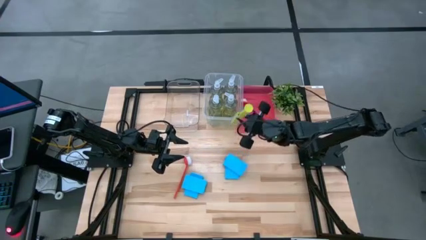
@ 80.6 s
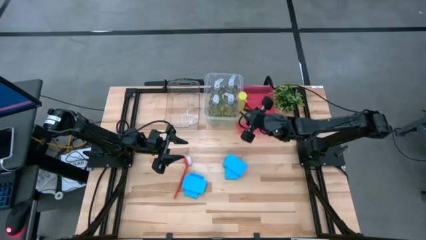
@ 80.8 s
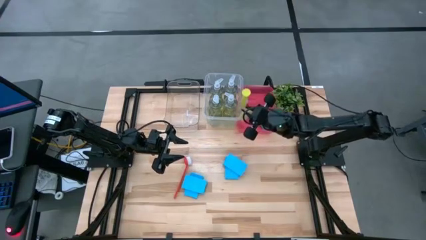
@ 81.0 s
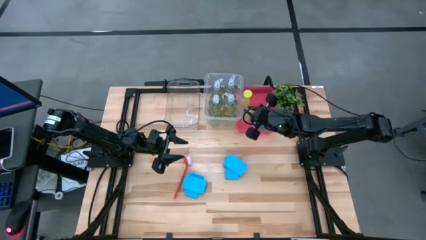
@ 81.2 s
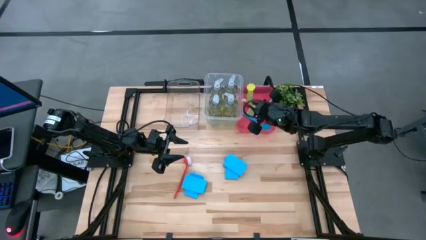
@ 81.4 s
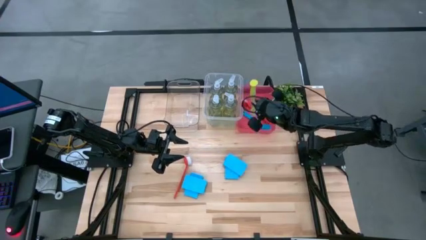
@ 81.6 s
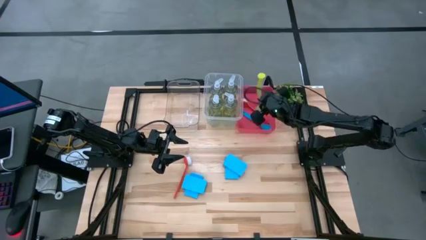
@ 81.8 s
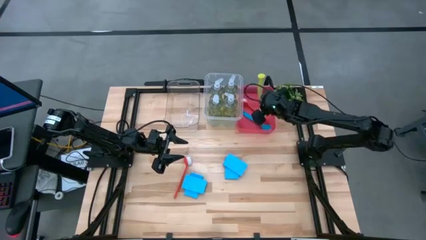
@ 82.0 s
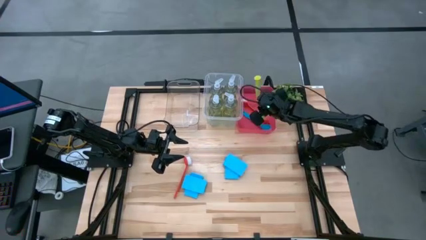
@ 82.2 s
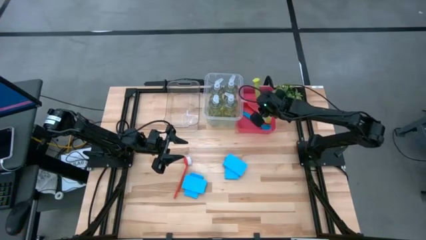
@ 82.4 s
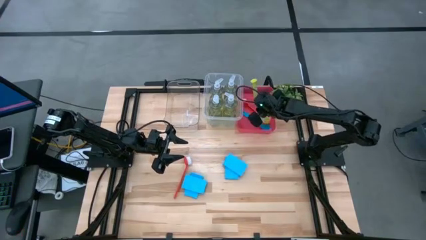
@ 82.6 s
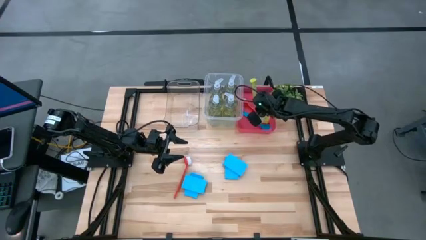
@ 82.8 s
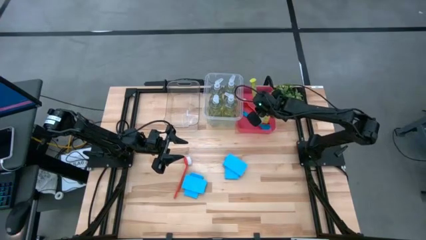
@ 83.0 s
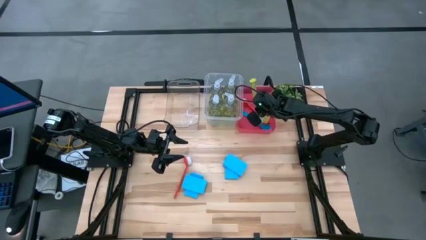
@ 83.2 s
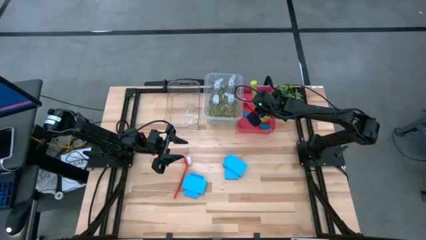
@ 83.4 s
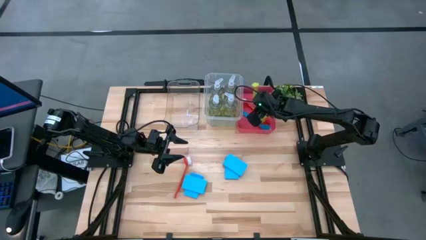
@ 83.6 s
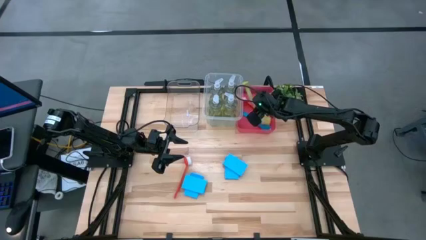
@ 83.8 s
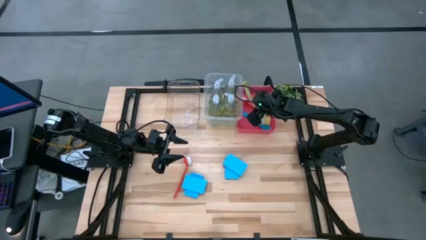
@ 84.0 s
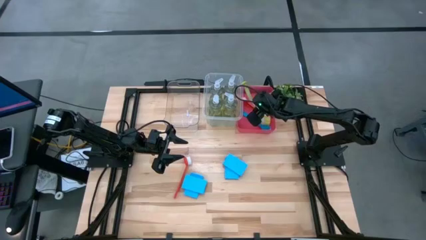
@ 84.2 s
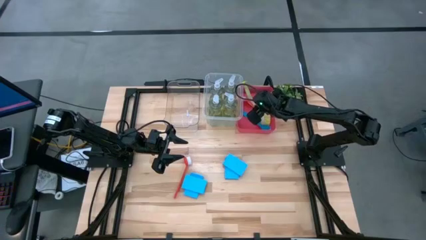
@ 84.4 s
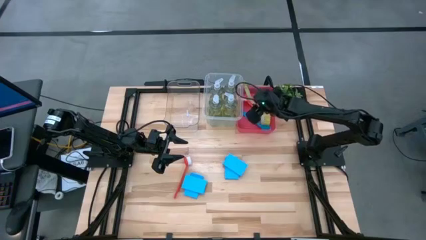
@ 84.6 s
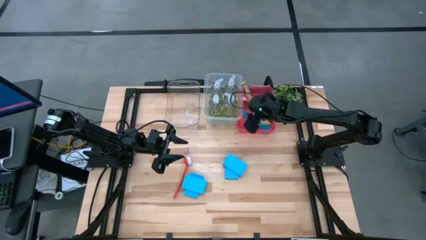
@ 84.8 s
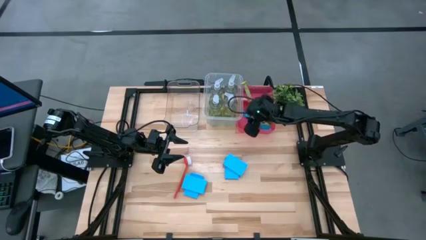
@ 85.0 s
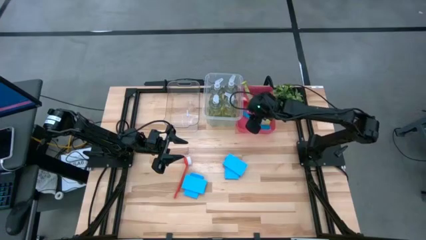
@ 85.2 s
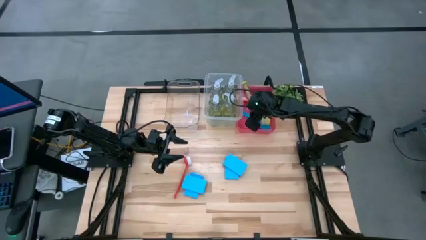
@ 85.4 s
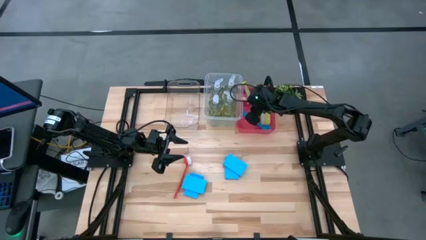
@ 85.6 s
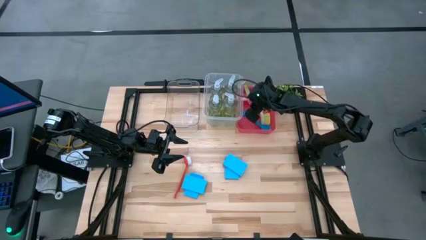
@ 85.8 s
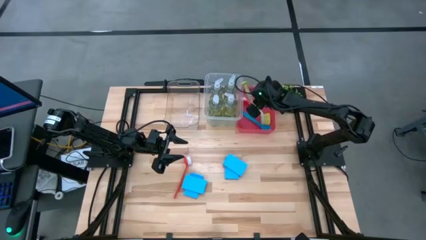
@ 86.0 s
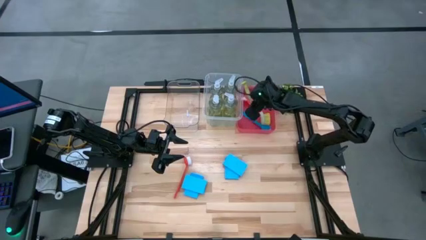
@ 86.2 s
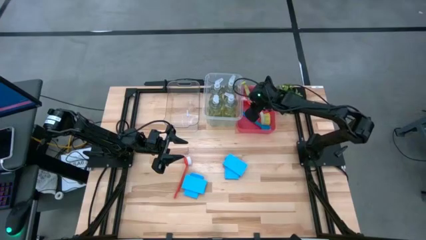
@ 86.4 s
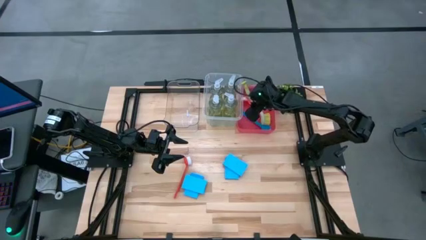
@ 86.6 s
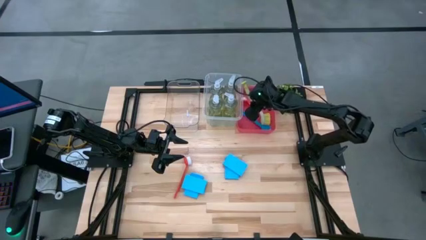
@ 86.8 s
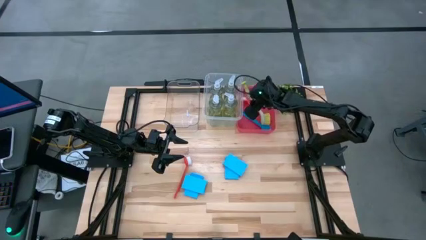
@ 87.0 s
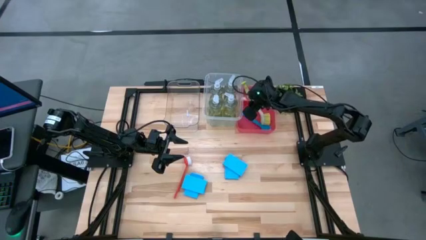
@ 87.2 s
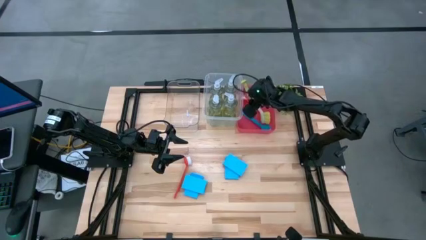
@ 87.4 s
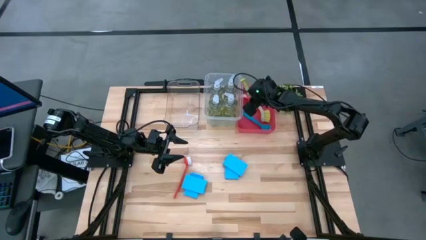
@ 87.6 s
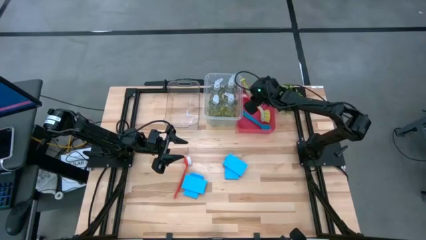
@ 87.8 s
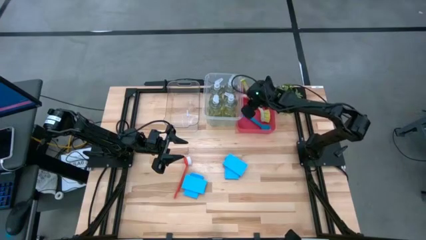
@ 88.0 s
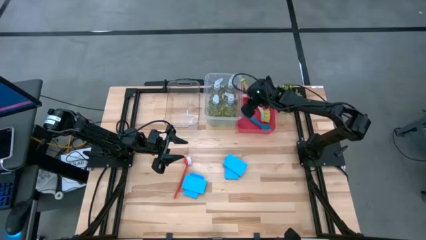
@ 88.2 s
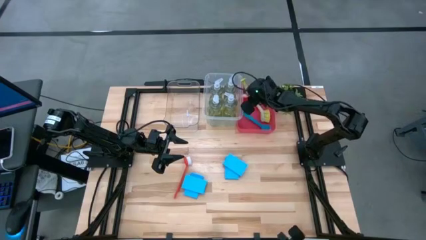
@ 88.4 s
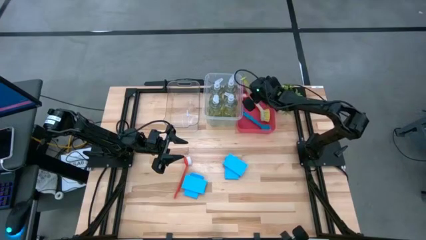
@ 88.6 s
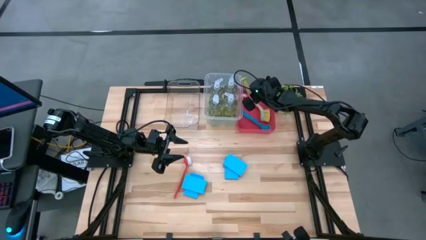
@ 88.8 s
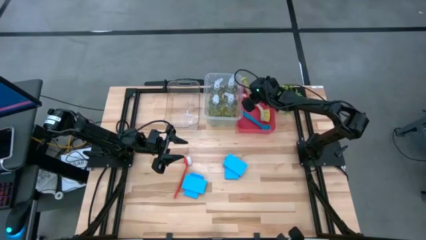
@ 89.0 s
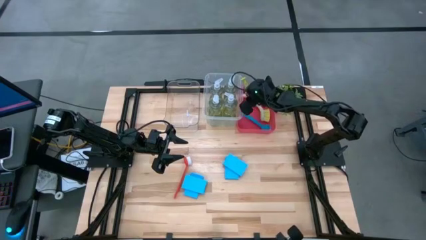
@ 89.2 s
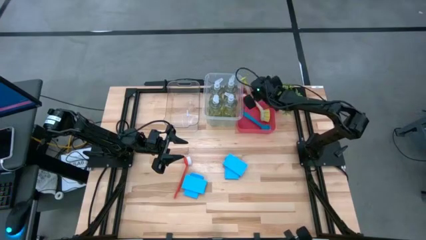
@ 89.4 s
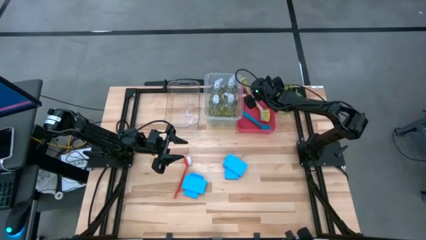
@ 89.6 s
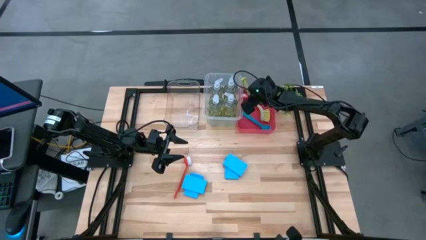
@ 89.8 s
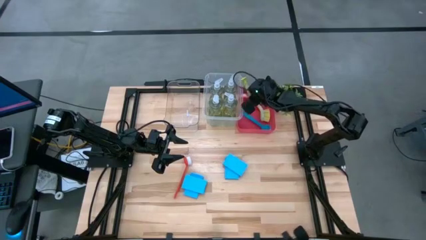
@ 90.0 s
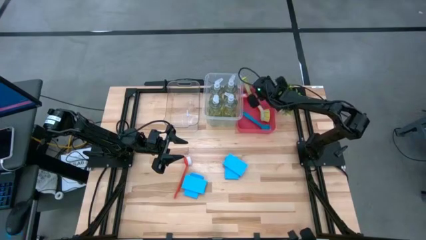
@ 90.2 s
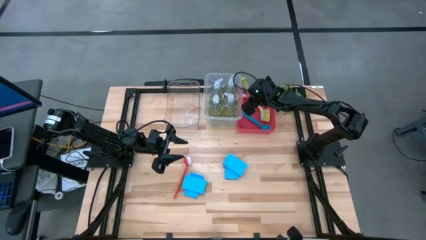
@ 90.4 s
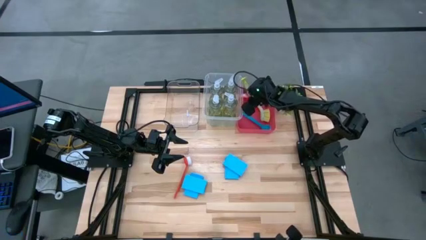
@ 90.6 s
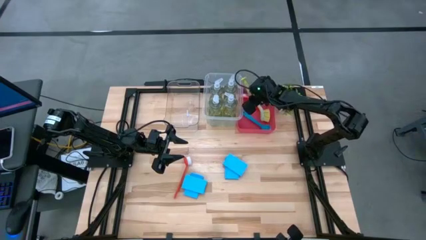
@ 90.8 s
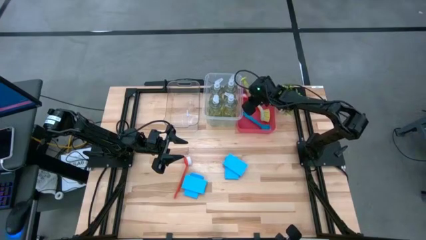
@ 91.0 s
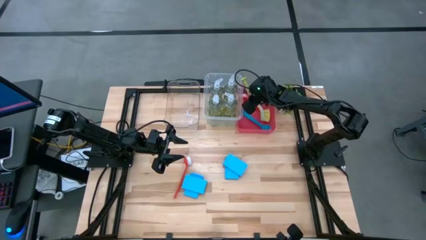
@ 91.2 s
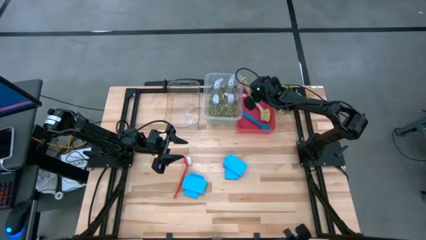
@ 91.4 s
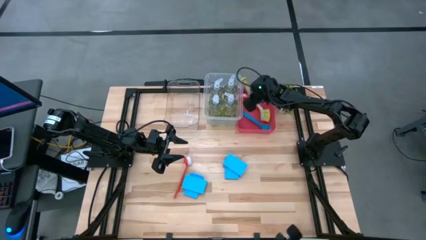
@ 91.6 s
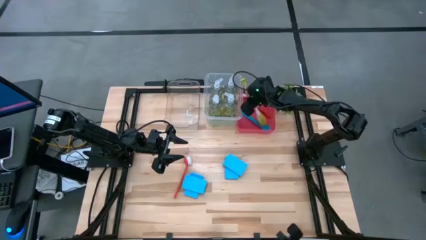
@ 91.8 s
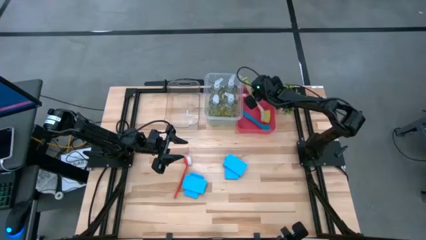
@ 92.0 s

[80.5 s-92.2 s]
Task: Pick & Place Kitchen Sink Supplies
Put the green dish brush into the pink bin

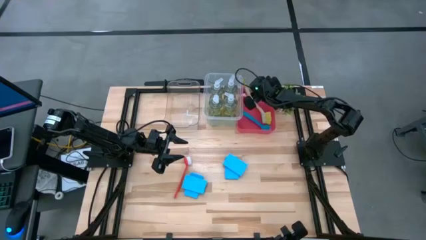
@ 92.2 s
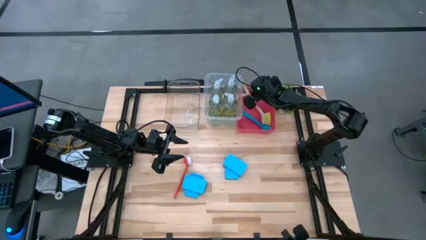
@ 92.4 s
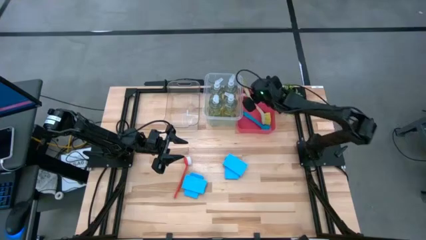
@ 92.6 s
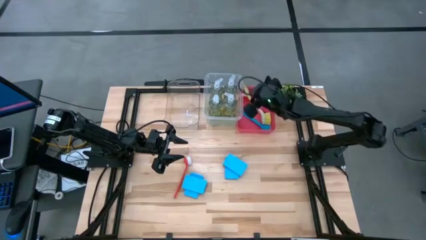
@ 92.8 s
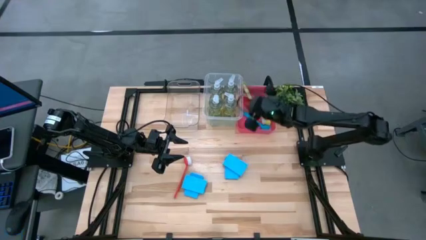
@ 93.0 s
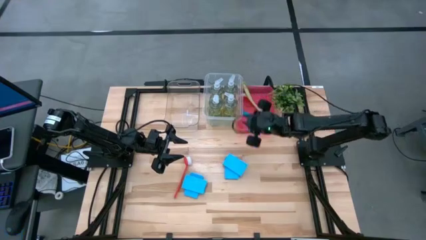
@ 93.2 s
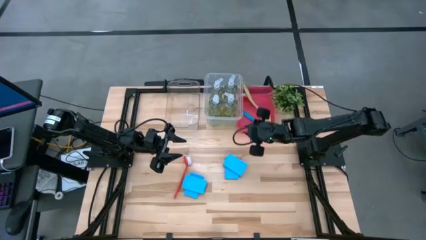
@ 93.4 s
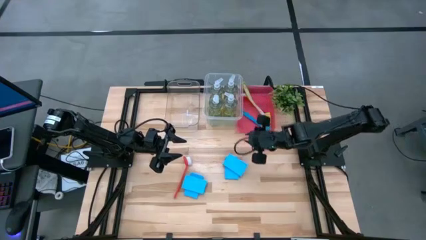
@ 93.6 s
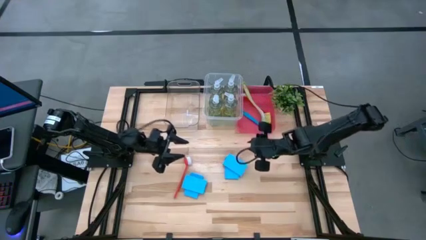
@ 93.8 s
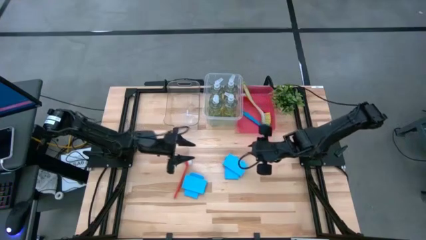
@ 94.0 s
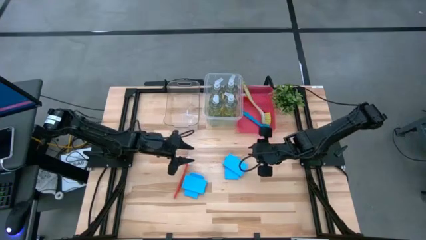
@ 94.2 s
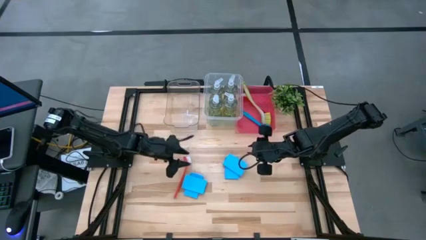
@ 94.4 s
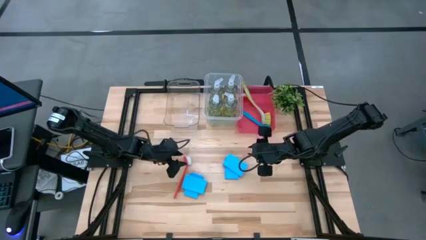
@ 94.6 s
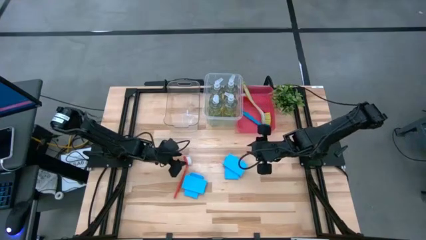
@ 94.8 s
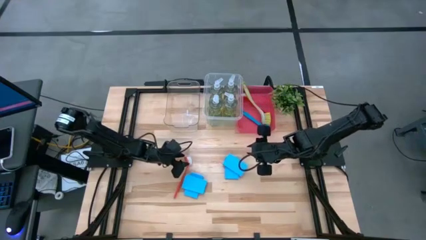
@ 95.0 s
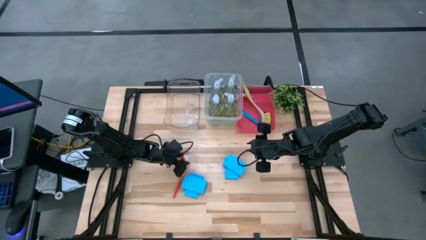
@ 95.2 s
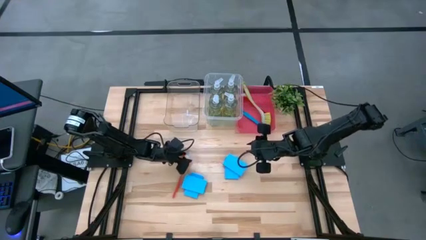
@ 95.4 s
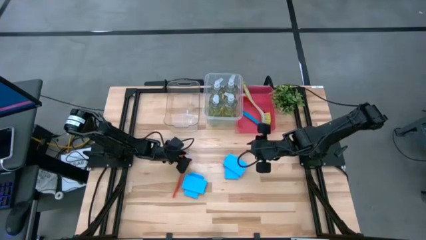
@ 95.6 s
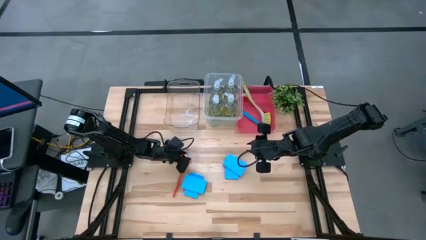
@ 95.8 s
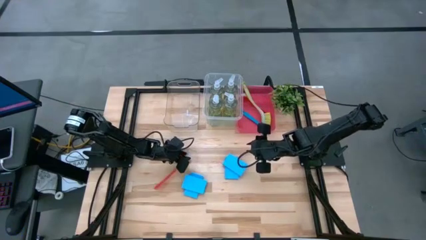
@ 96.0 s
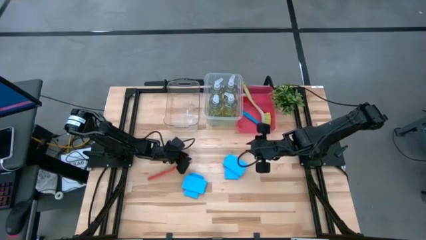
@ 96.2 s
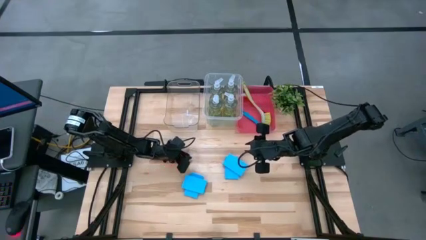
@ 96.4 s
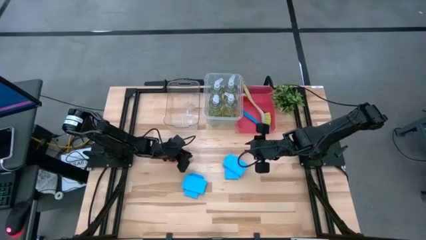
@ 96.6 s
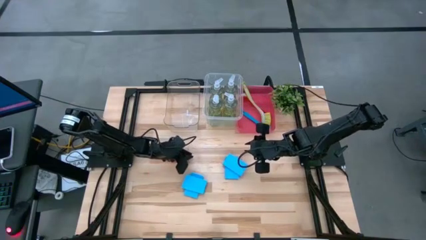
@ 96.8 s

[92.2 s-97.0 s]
Put the red dish brush into the pink bin
